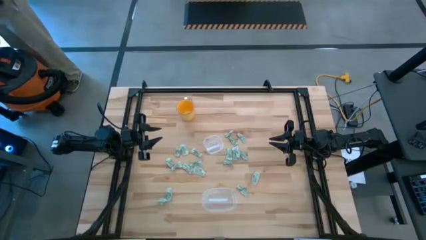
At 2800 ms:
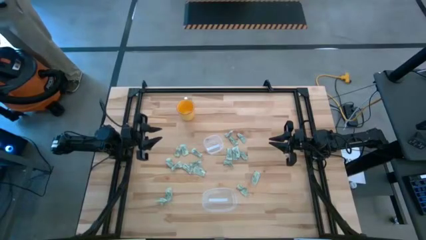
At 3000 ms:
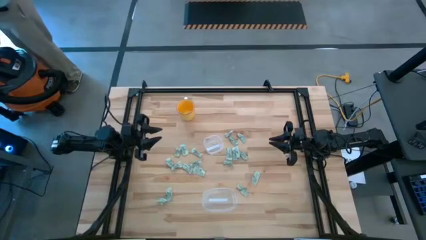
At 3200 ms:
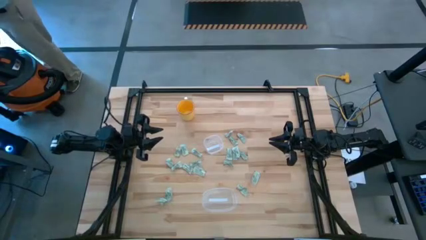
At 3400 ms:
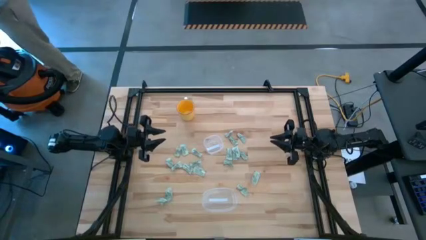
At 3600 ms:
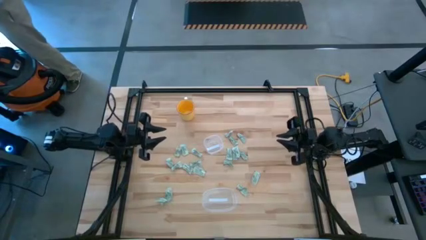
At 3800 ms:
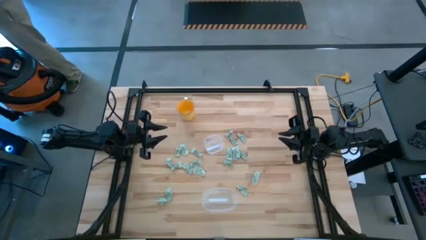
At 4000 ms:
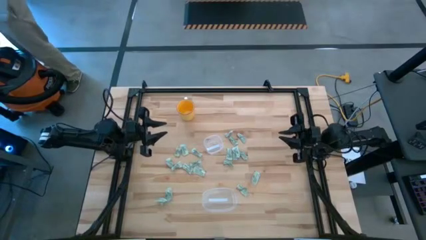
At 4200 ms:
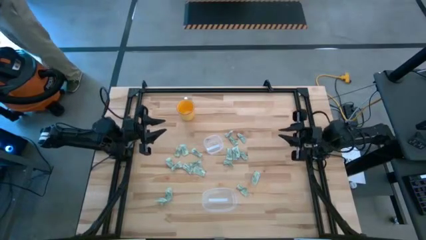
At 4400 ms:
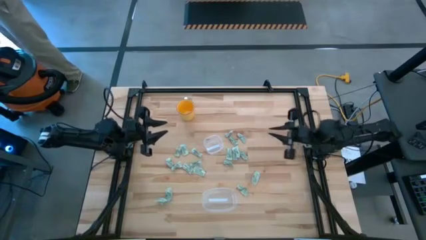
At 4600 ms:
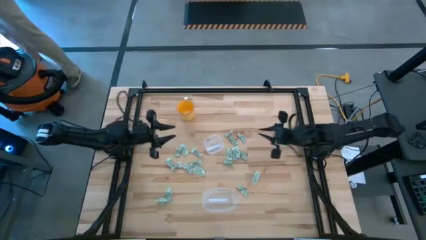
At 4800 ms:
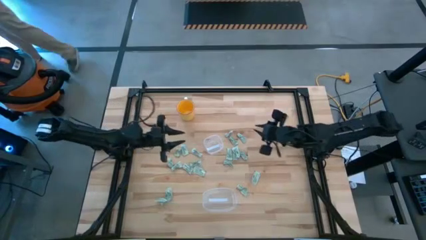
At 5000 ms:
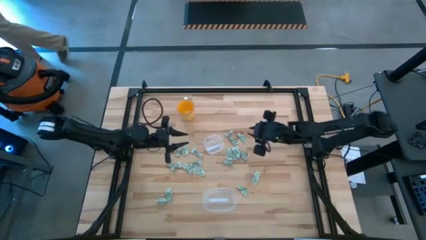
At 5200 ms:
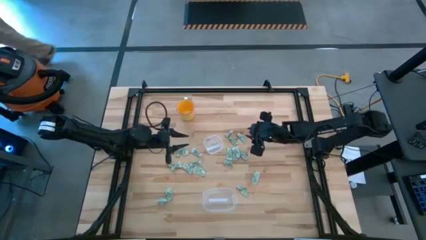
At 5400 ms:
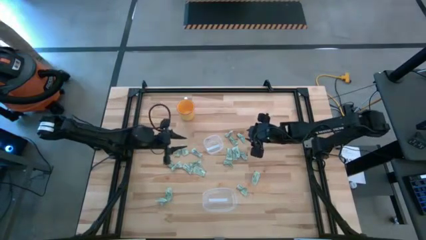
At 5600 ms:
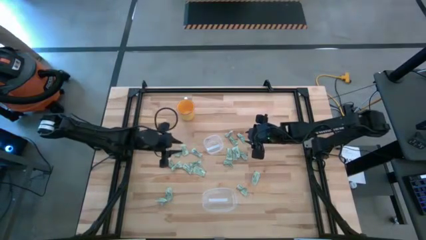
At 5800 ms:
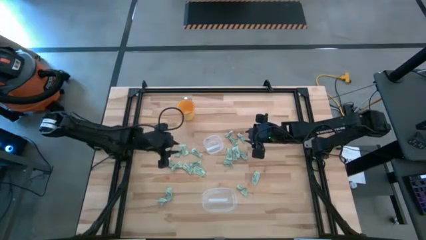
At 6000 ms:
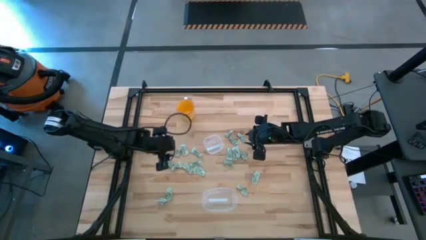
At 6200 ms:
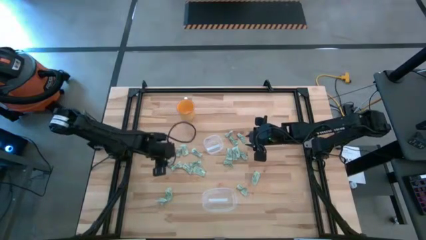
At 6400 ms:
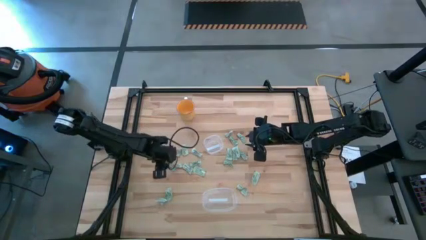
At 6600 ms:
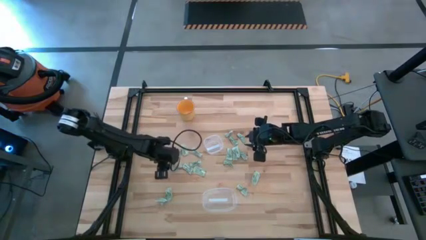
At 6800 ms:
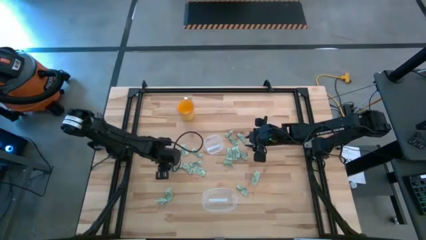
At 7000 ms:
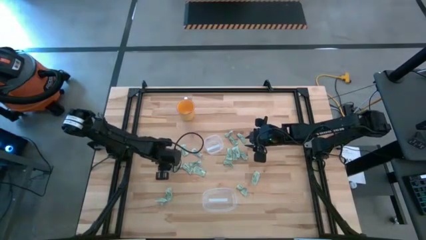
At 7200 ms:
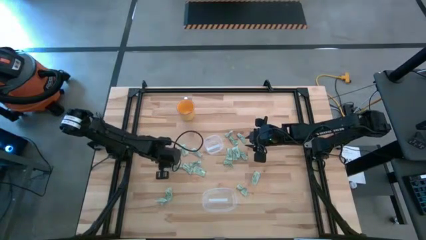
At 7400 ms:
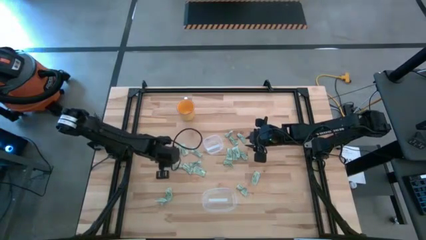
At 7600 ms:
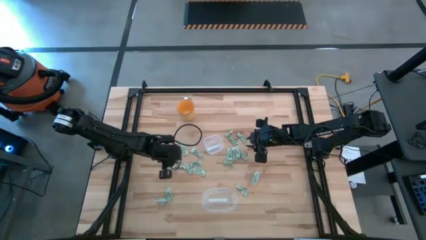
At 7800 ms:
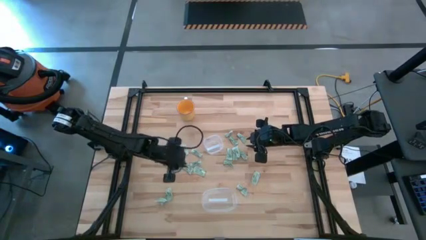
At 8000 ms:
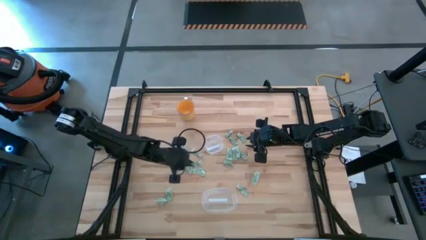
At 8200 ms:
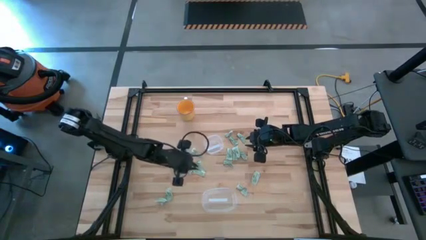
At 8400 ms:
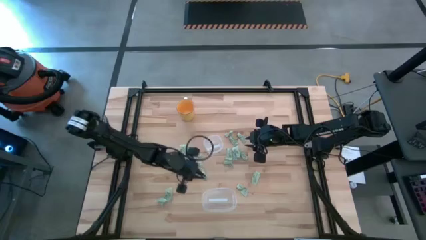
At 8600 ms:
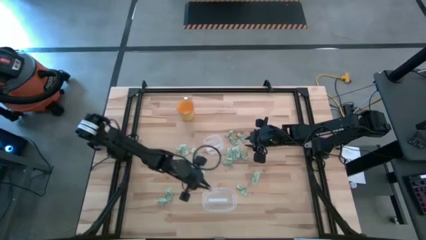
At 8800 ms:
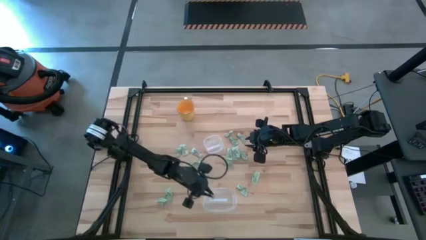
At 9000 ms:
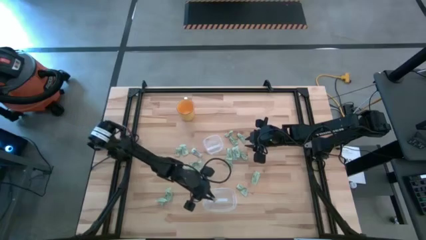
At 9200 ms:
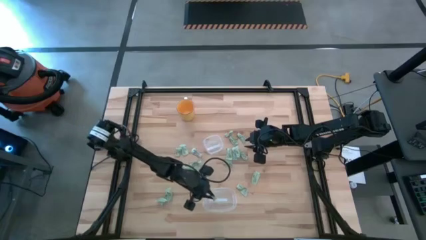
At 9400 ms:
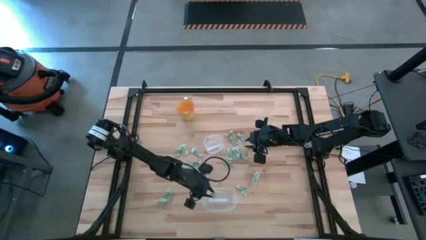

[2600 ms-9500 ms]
Put the white stevia packet into the bottom transparent bin

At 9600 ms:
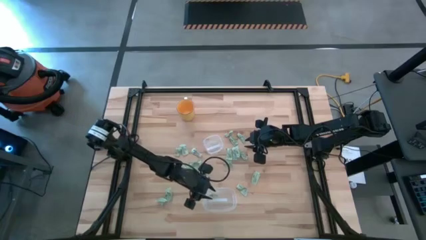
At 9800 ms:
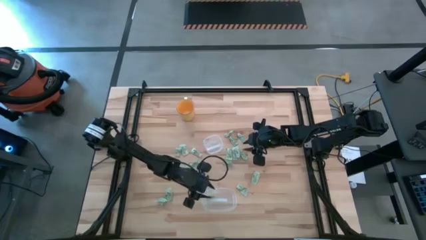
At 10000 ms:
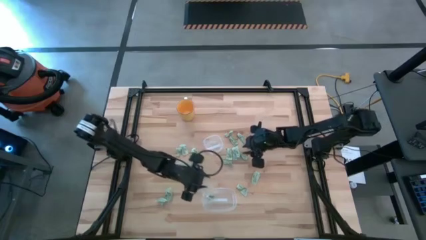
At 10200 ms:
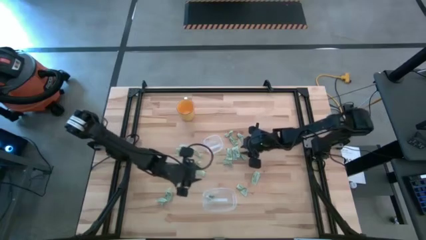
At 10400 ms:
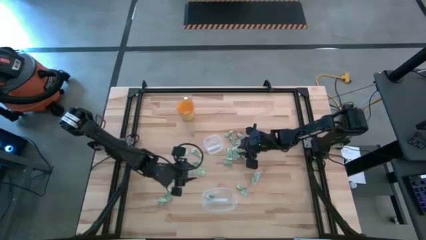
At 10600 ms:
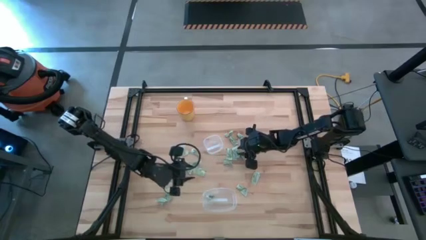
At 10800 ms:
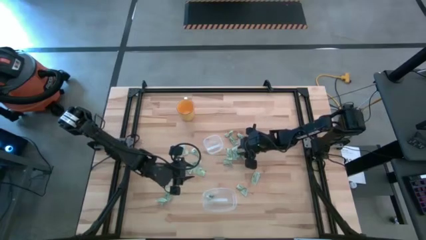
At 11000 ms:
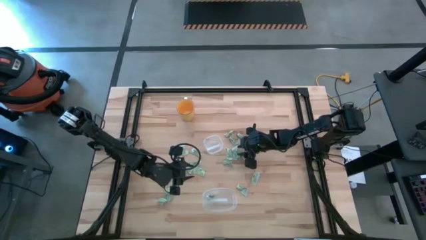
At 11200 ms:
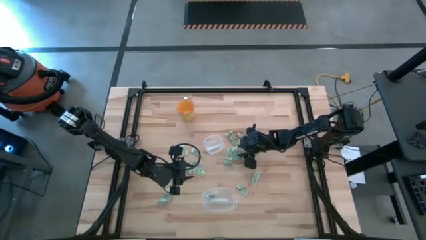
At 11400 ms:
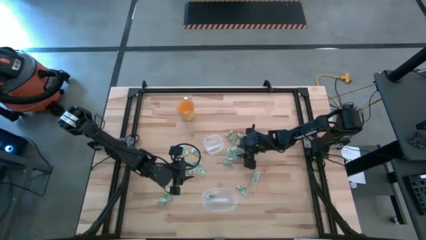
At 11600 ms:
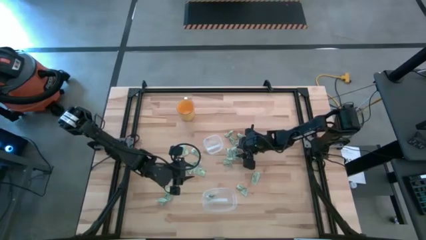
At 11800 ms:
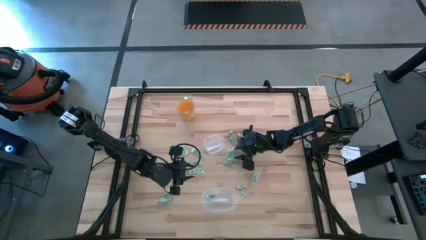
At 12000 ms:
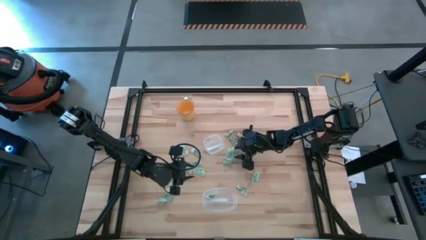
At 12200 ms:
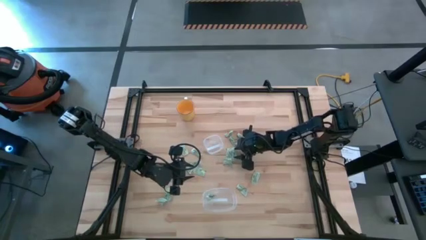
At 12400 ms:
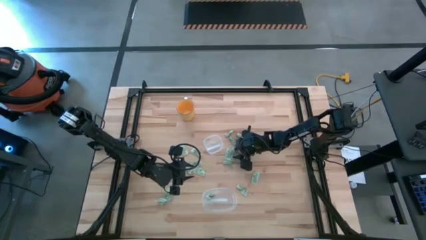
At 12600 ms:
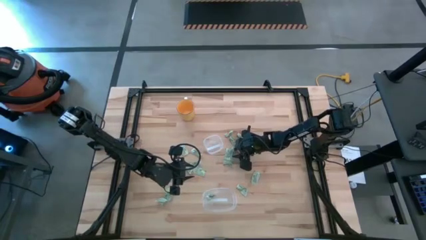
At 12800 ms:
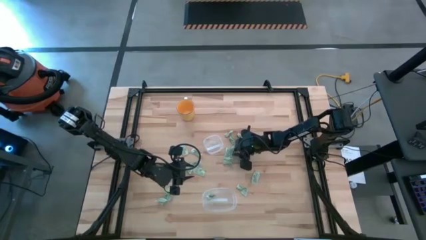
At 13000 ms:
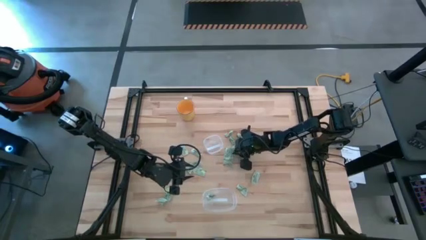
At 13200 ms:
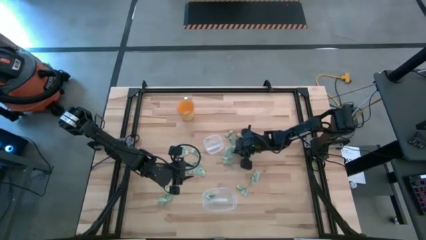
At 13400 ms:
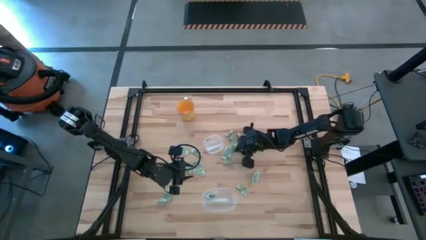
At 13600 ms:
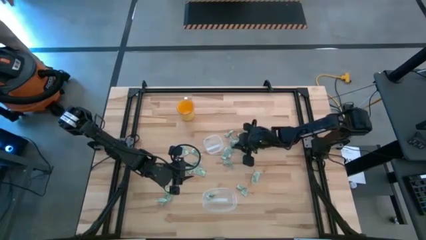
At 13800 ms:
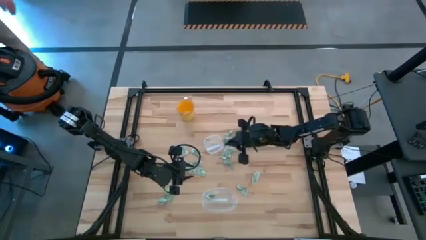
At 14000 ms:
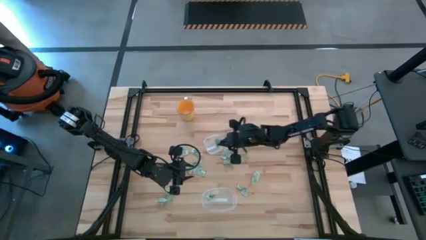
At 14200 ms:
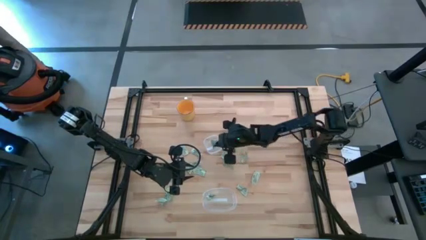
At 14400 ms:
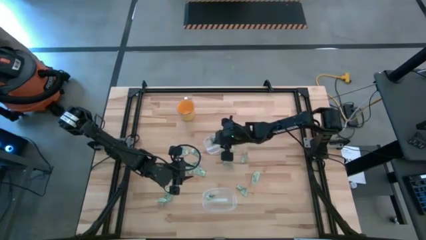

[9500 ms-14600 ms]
Put the white stevia packet into the top transparent bin

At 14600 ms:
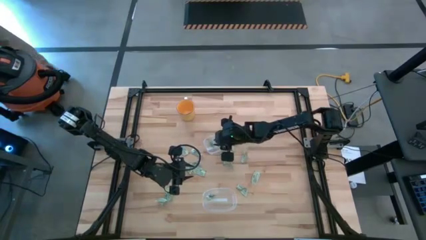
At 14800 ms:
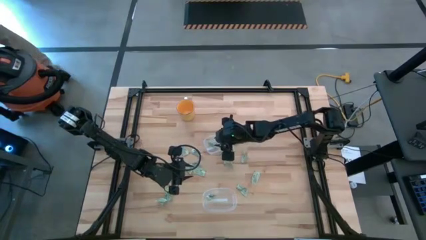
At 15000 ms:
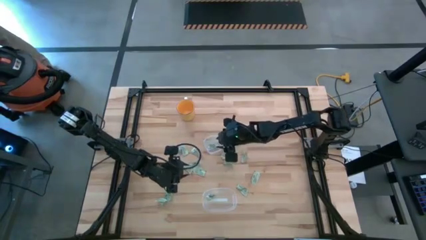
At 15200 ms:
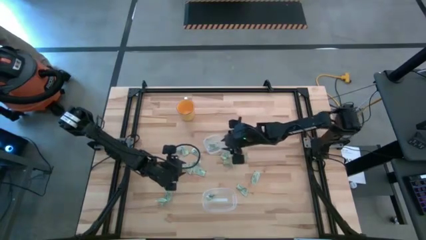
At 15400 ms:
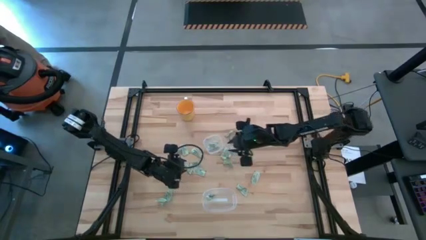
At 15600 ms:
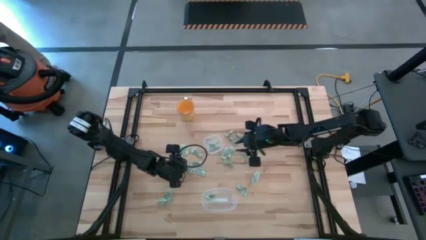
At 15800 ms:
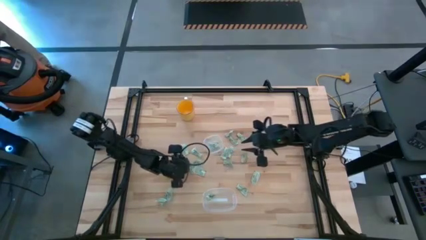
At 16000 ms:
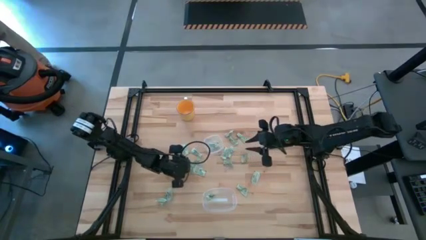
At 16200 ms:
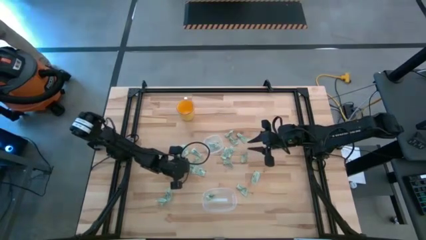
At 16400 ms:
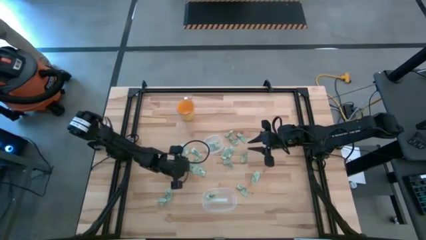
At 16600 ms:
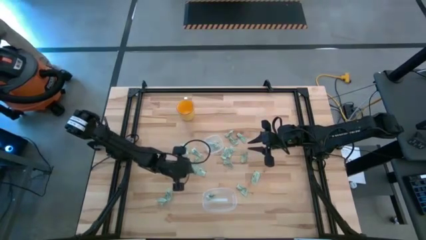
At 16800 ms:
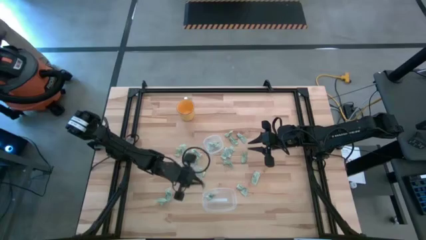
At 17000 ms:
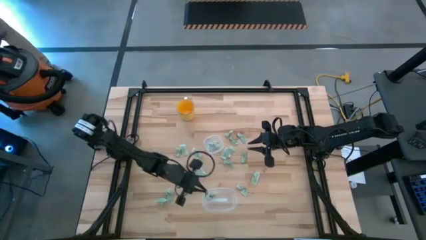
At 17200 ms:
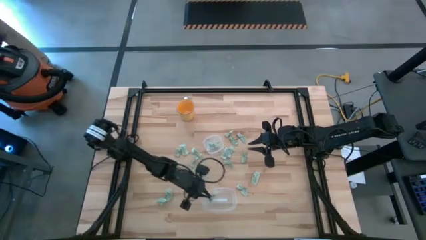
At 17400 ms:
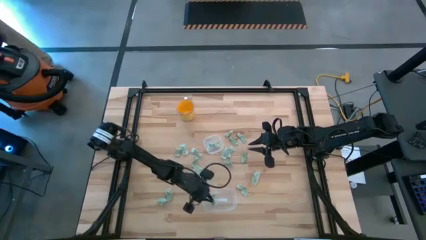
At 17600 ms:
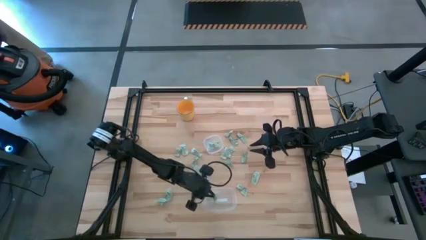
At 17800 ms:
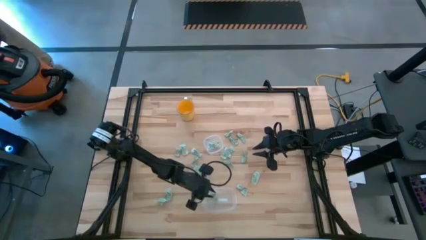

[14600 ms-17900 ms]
Put the white stevia packet into the bottom transparent bin

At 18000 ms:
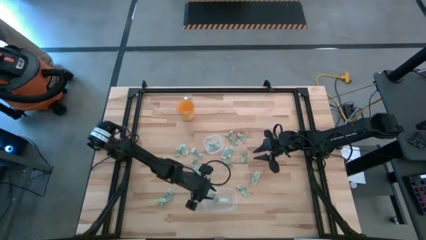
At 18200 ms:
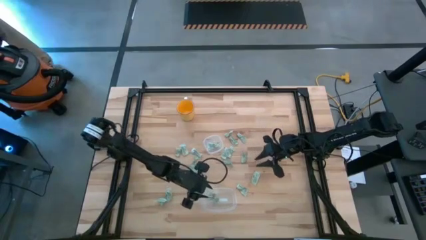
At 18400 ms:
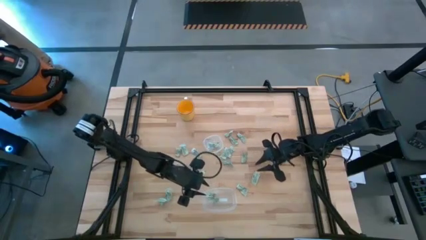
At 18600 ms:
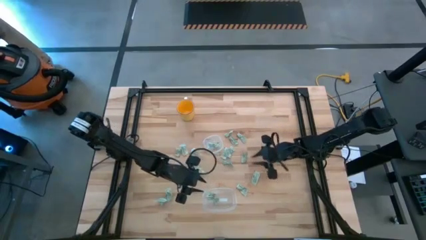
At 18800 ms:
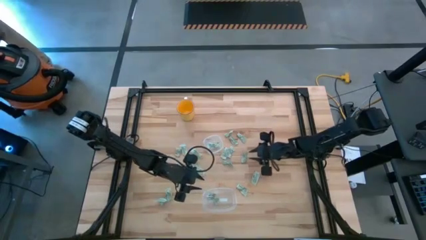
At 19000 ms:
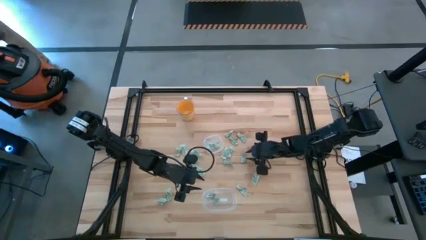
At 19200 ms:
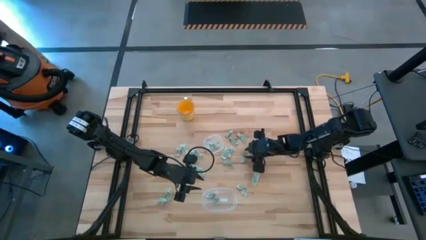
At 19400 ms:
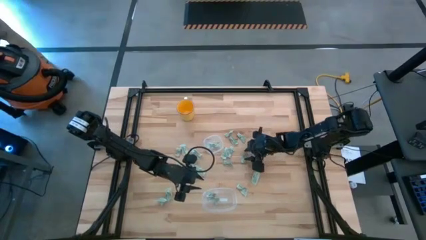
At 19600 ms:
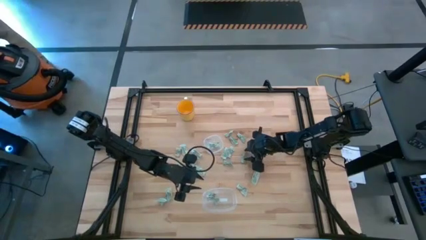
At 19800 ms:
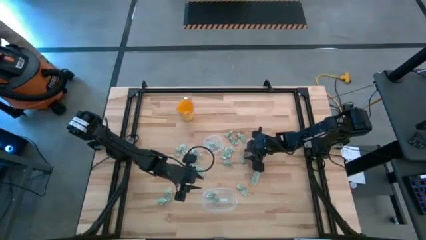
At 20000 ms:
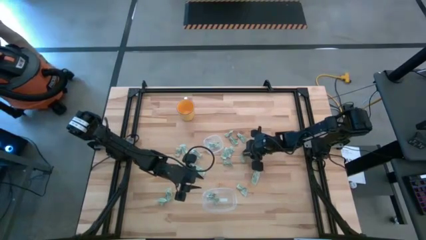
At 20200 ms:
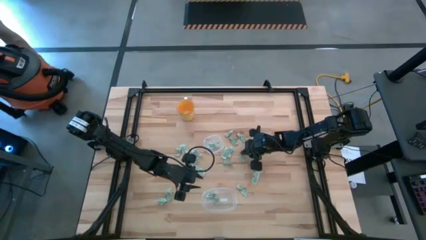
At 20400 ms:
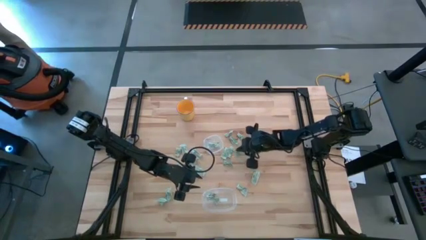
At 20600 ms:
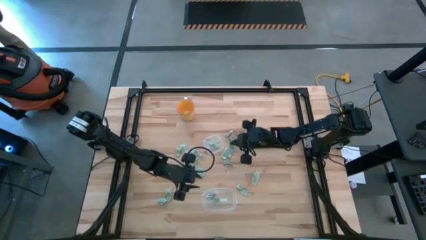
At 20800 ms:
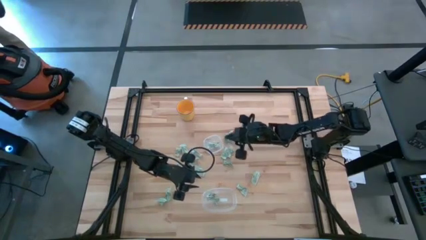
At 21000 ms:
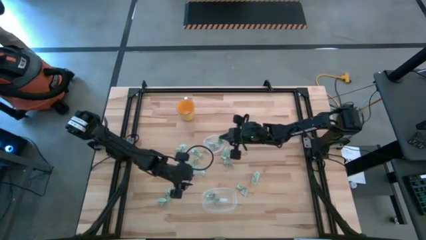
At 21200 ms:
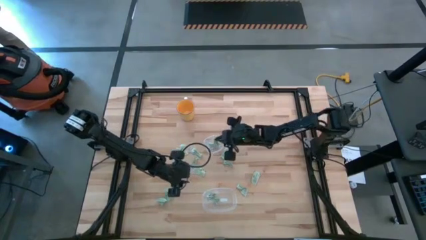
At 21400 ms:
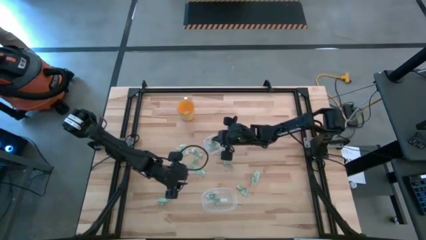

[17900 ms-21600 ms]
Put the white stevia packet into the top transparent bin
